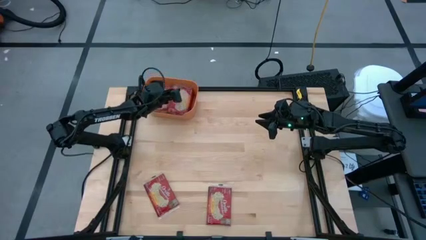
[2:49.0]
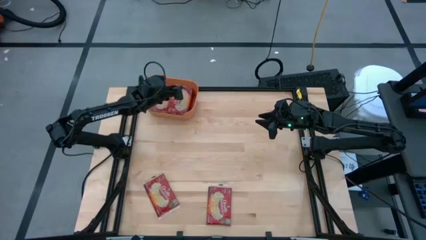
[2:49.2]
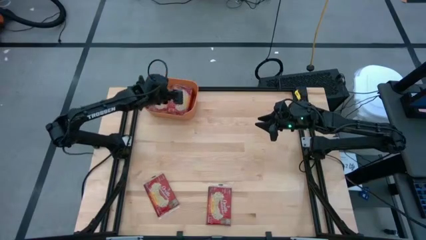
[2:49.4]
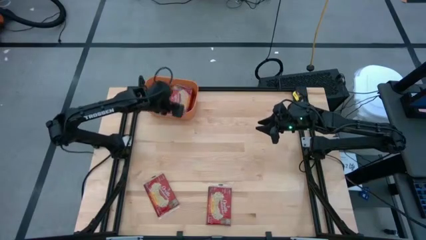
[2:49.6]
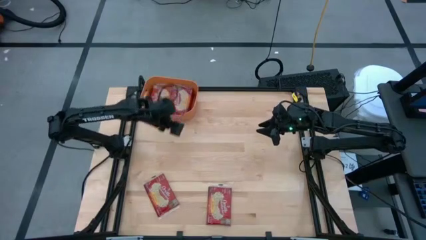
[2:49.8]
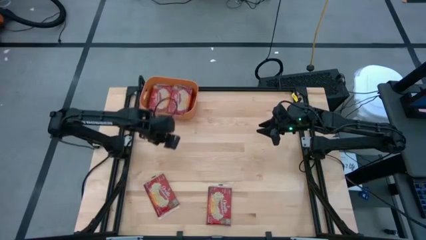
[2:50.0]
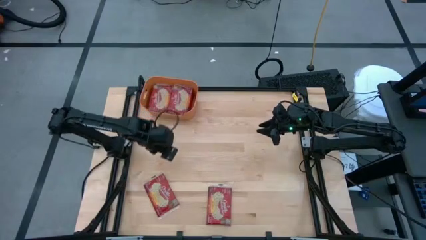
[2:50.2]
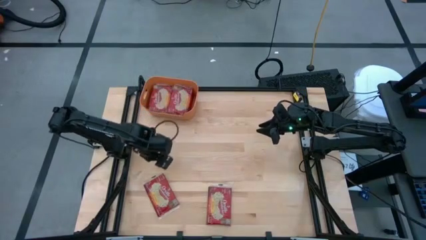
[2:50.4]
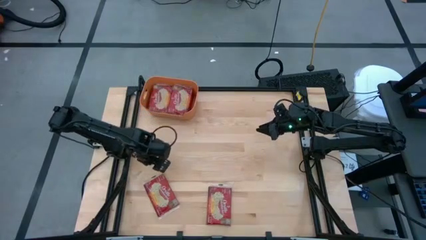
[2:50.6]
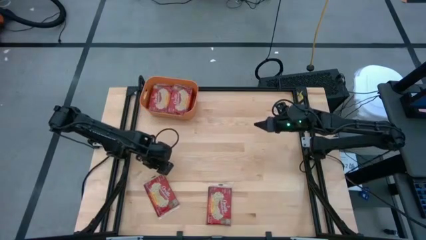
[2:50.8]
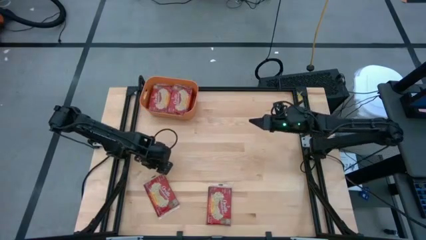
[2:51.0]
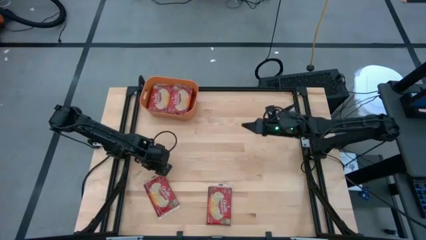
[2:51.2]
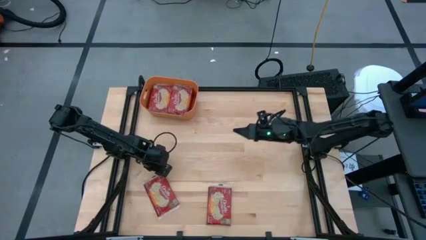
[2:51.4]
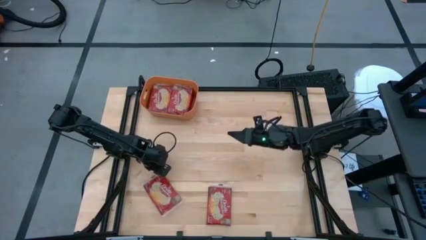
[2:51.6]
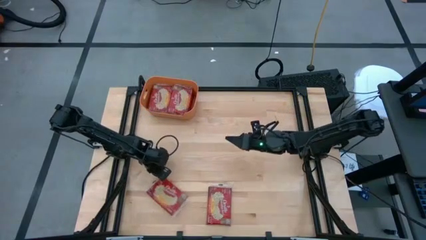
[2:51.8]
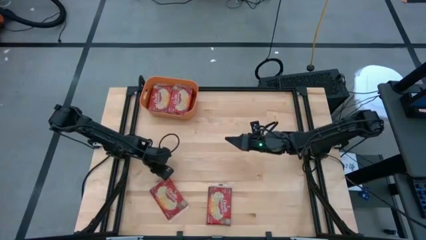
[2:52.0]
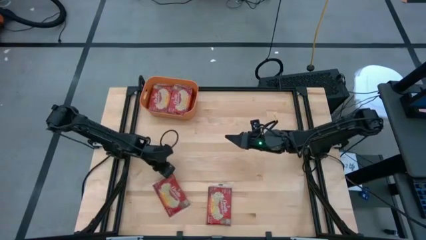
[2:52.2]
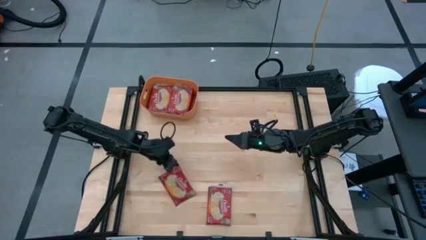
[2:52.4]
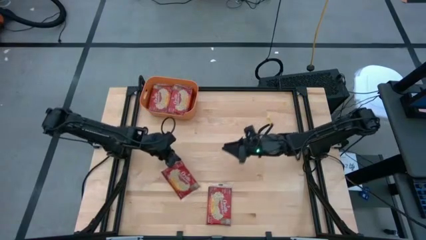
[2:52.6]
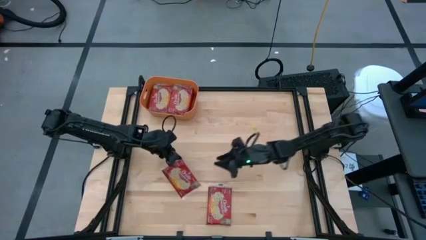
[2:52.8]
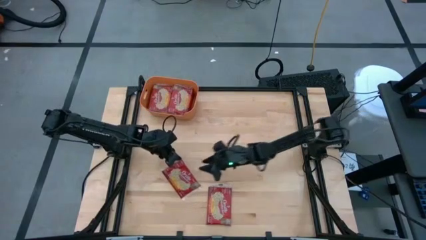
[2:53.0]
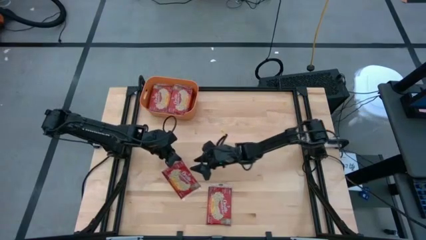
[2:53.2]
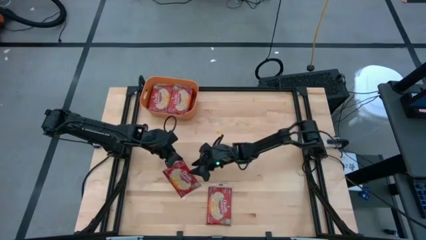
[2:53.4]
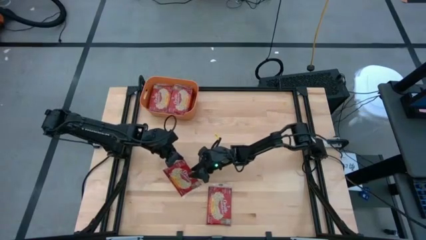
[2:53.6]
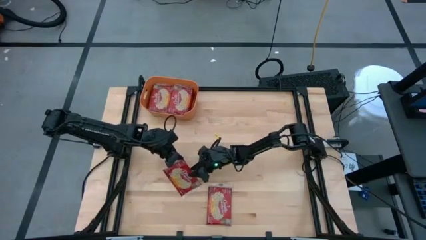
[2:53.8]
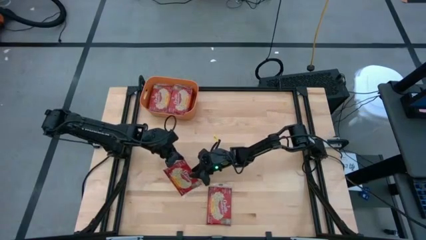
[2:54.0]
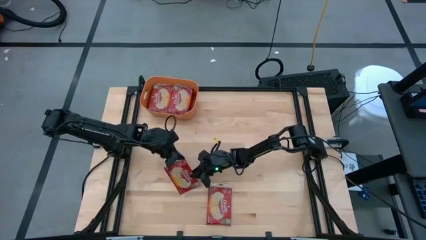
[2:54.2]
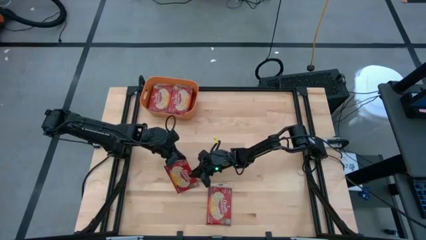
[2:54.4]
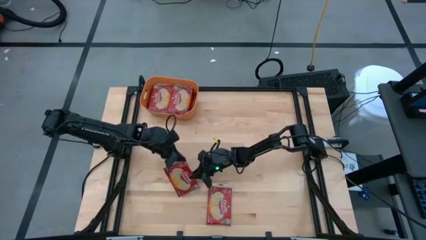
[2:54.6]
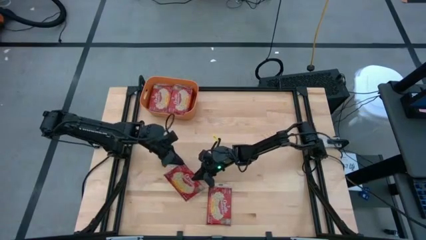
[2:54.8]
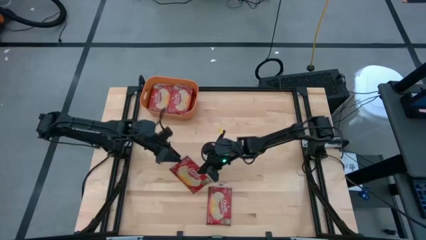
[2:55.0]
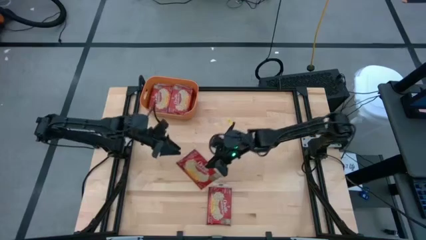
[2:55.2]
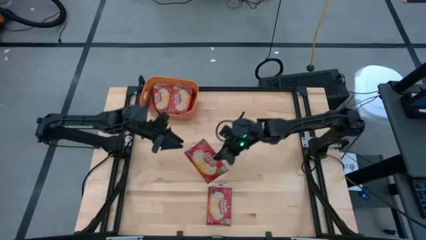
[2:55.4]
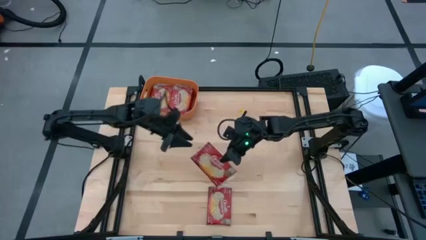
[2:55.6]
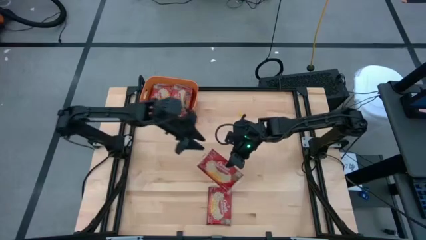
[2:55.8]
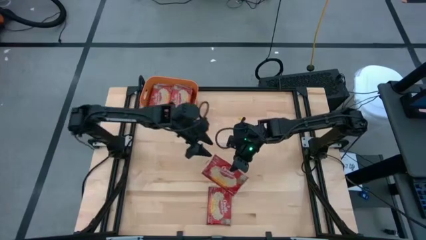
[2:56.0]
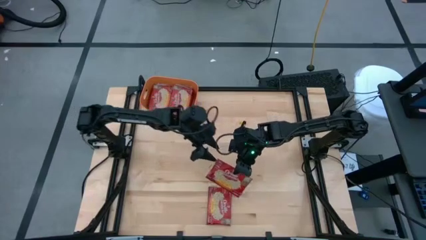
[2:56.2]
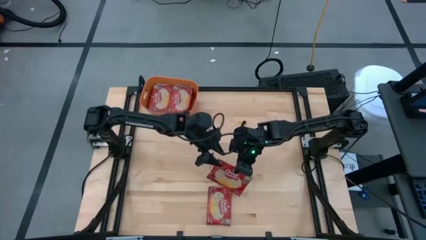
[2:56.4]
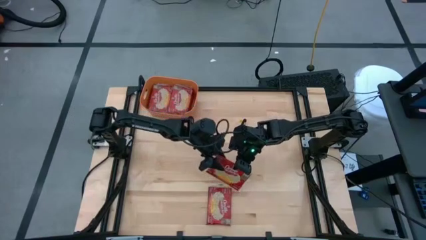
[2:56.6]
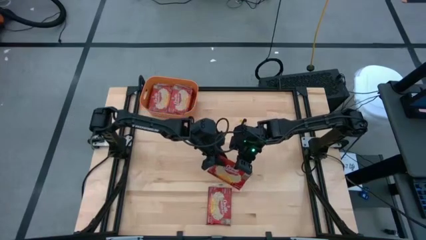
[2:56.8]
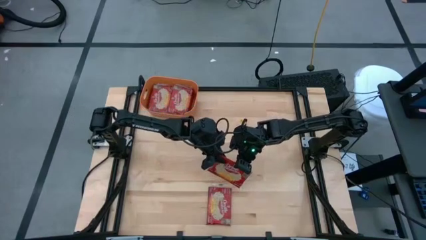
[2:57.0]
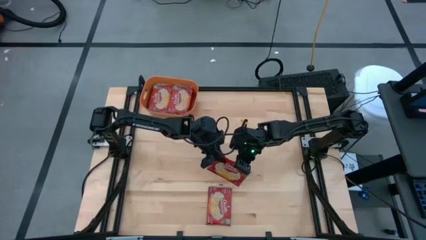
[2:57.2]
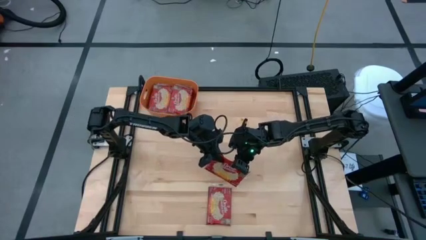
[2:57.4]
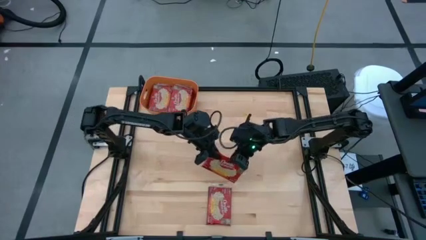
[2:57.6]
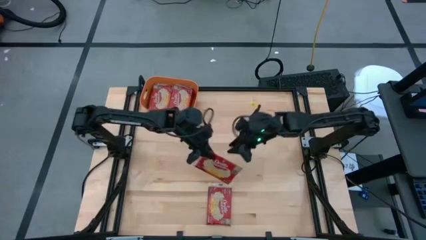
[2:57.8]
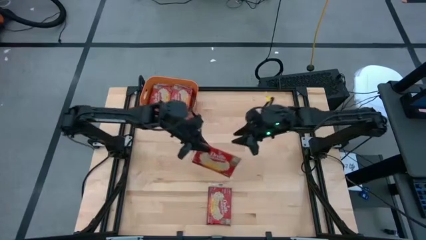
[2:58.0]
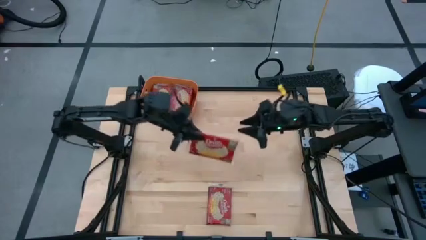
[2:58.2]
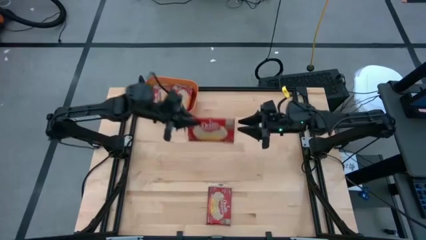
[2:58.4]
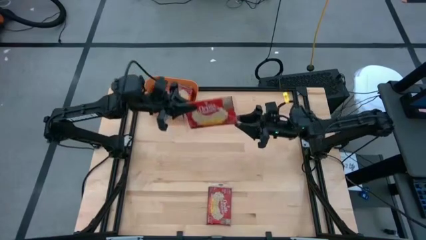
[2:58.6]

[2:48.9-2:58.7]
Task: Sort popcorn bags into baskets
Stack the red popcorn bag on top of the red popcorn bag in the orange bin

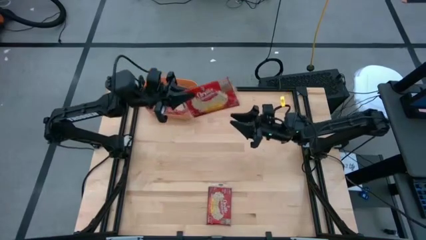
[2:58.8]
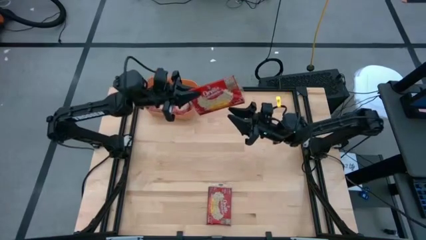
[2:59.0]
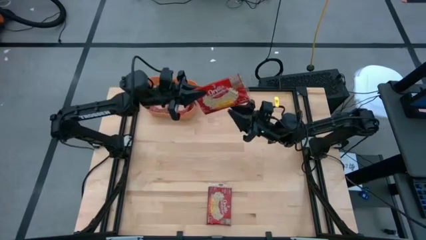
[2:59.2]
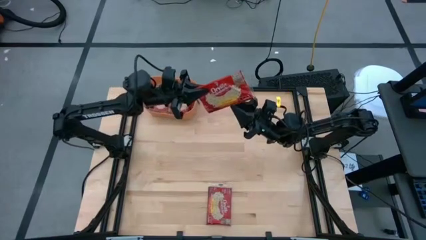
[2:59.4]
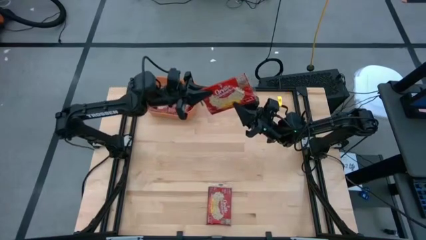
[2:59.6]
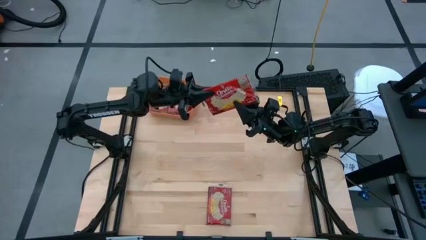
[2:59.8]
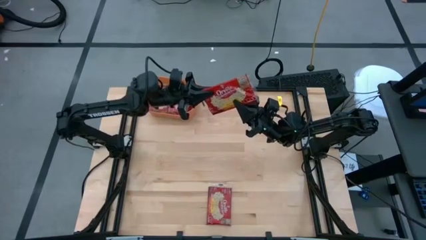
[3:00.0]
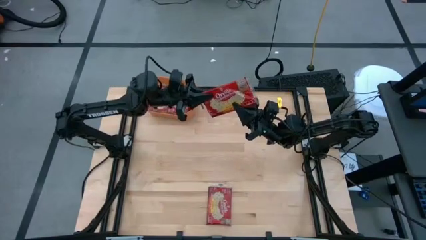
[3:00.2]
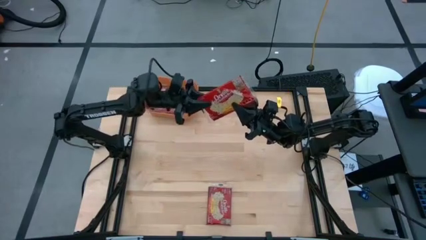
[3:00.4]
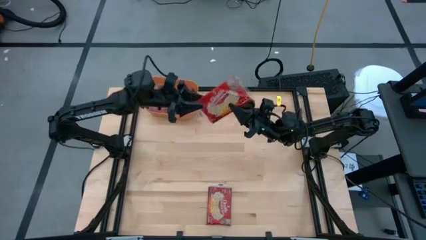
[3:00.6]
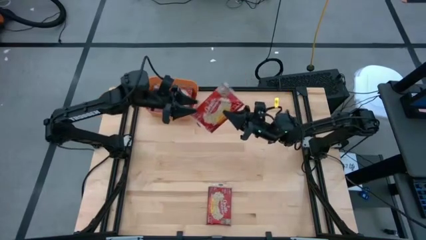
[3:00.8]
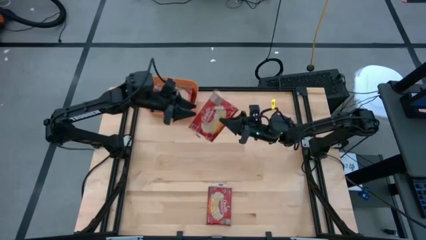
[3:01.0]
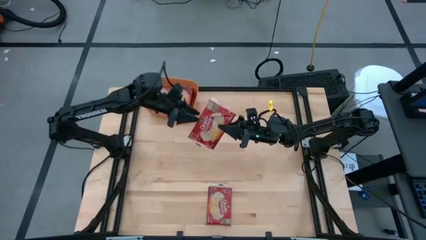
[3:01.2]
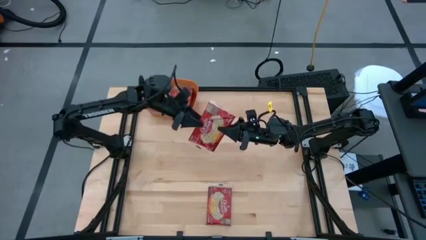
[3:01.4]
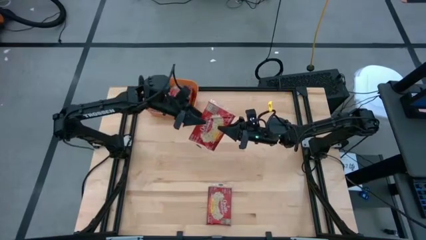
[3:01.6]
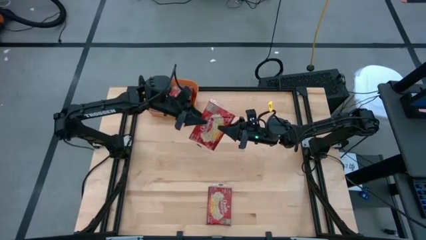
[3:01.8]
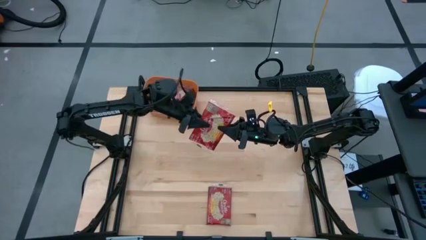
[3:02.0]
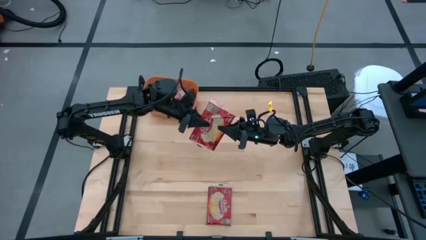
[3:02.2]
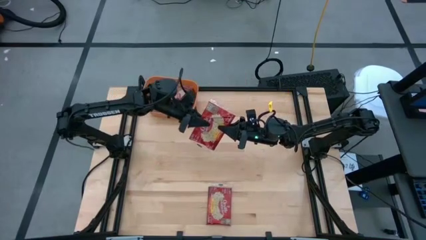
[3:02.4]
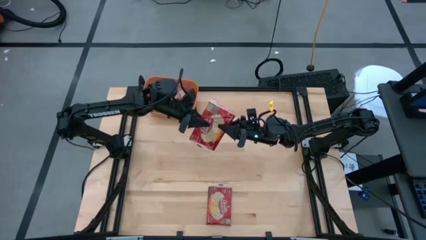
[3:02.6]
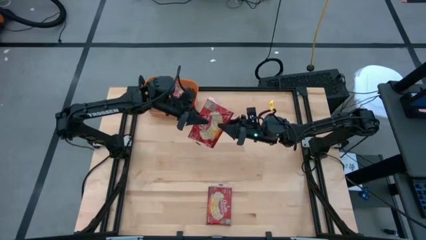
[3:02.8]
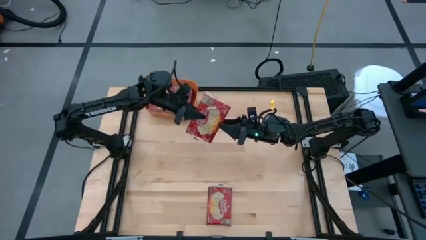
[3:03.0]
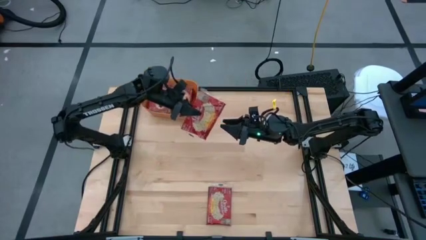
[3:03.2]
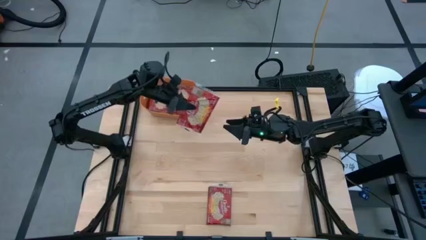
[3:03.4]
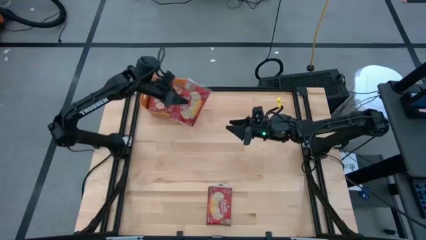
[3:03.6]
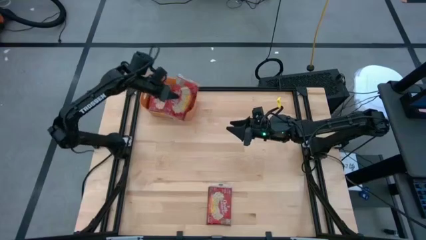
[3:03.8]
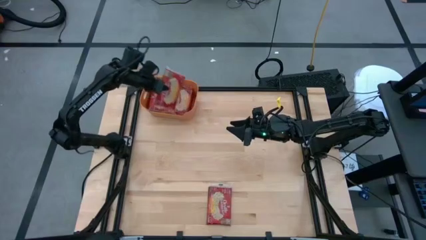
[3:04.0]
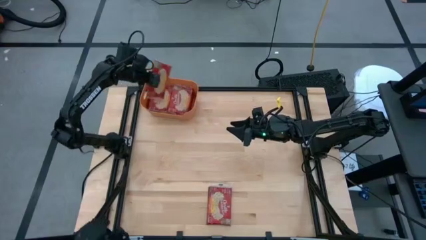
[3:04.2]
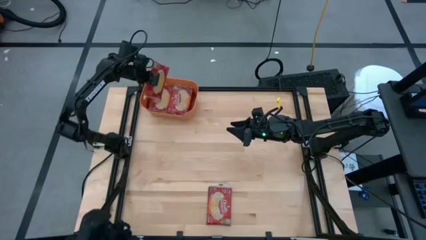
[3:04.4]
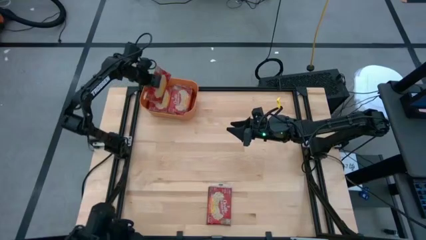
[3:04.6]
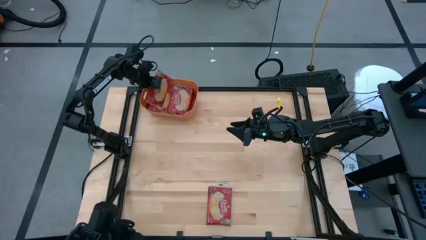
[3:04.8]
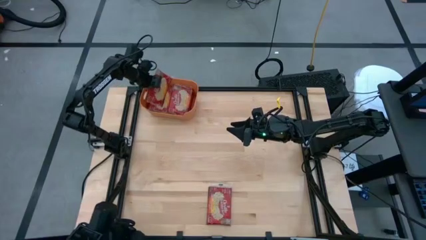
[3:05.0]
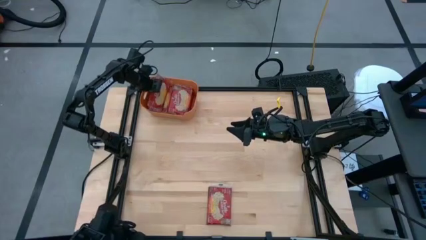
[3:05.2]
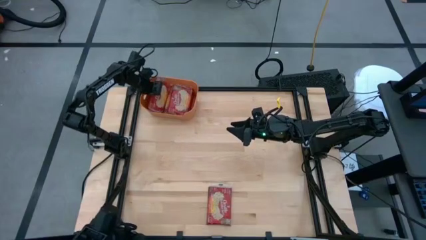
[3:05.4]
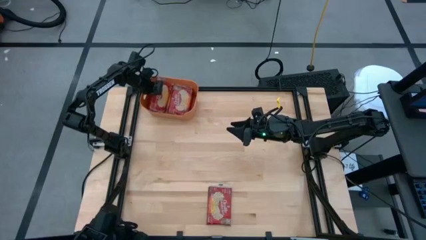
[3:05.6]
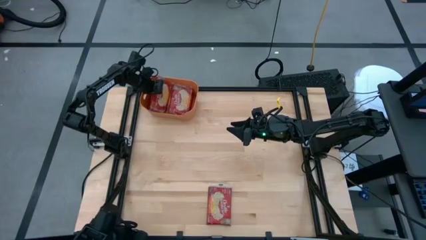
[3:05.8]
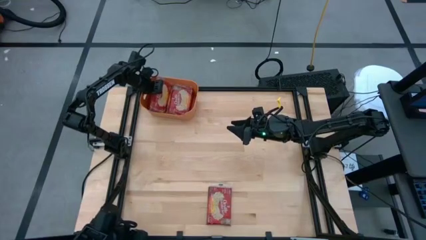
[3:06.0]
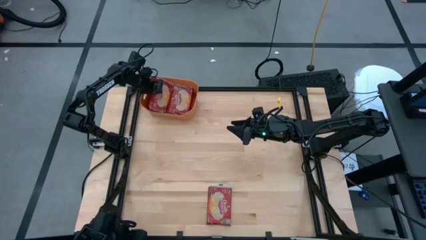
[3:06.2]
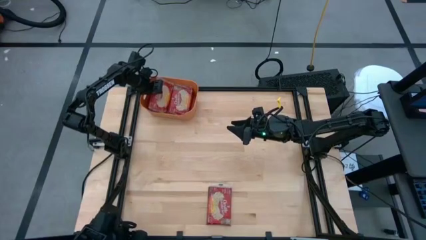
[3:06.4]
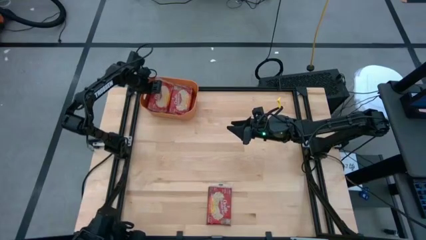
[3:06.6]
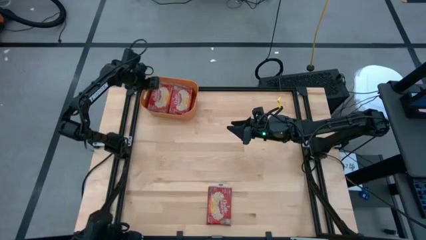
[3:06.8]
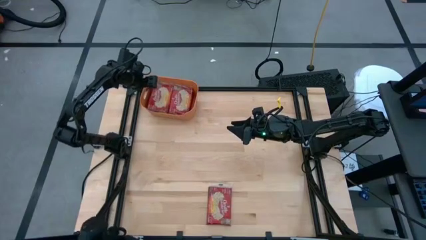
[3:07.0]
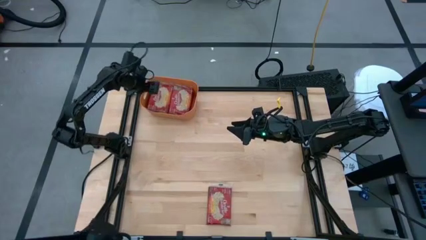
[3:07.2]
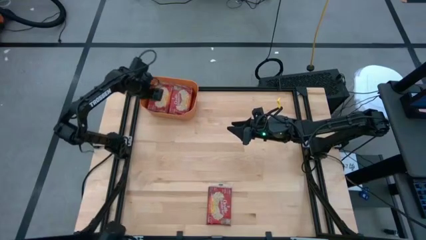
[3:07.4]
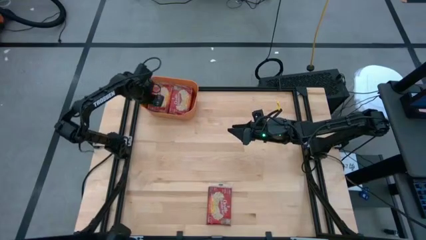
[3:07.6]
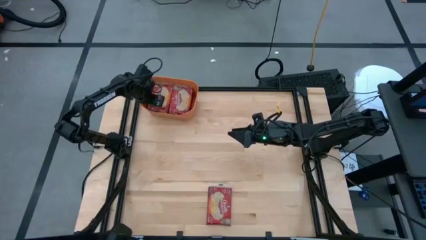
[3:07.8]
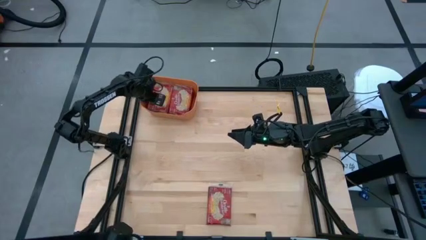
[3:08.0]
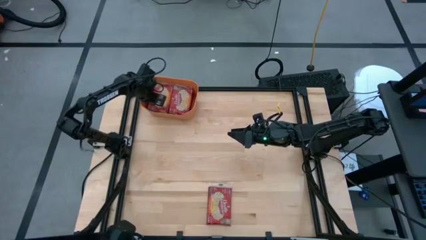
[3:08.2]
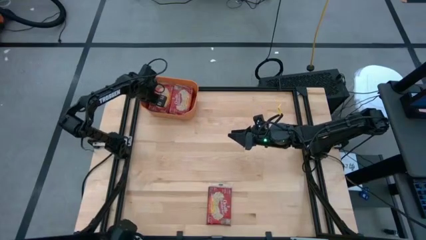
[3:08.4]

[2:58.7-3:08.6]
Stack the red popcorn bag on top of the red popcorn bag in the orange bin
